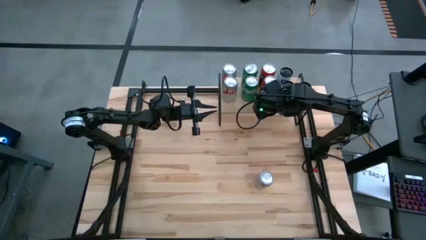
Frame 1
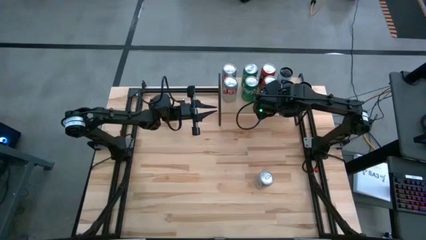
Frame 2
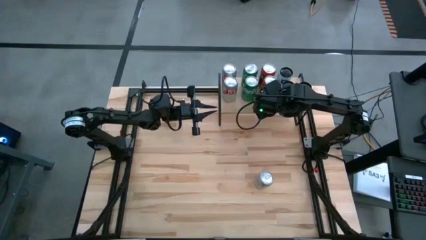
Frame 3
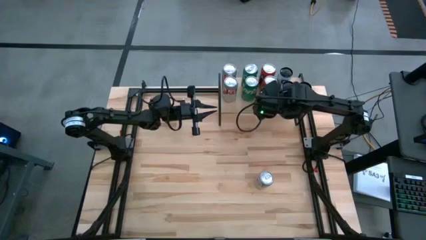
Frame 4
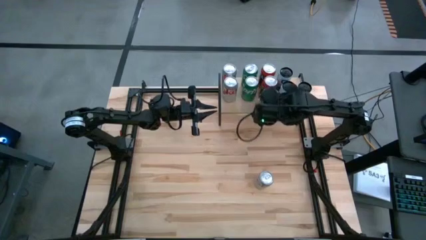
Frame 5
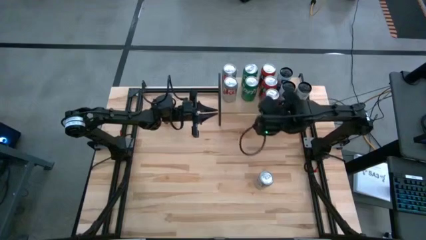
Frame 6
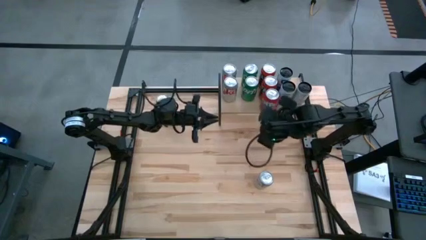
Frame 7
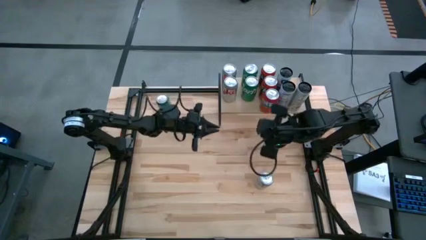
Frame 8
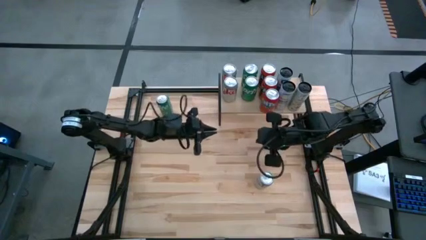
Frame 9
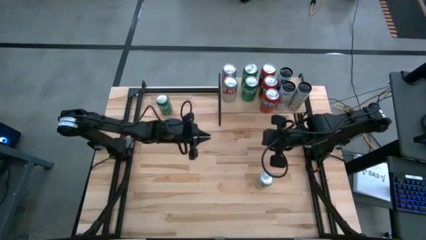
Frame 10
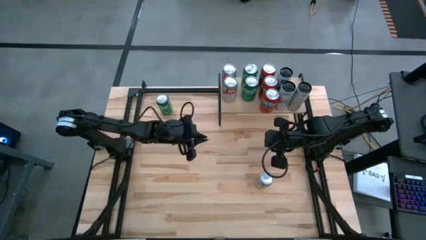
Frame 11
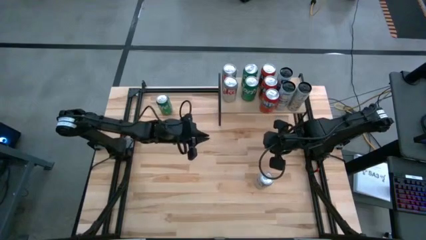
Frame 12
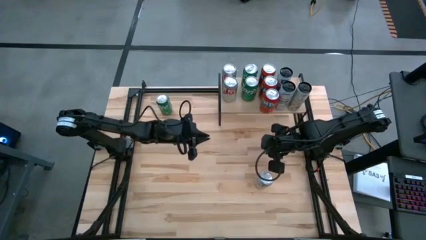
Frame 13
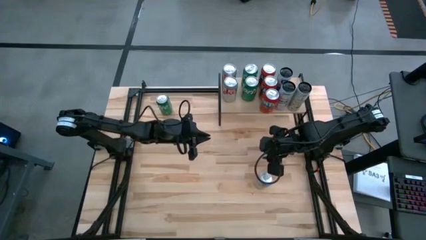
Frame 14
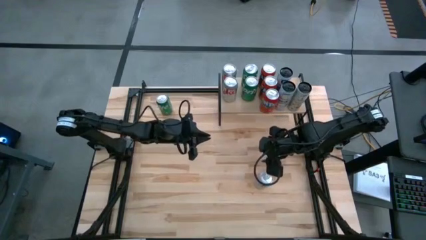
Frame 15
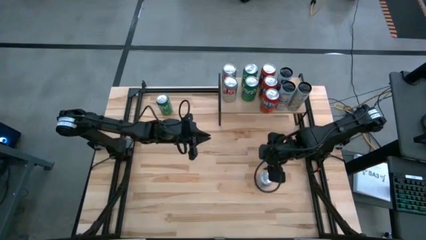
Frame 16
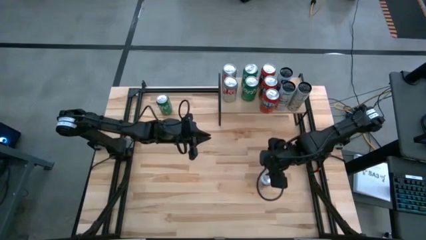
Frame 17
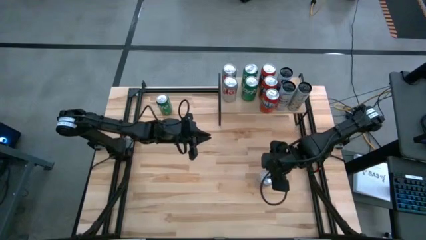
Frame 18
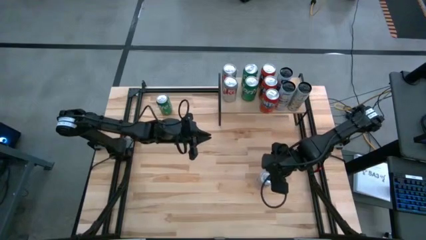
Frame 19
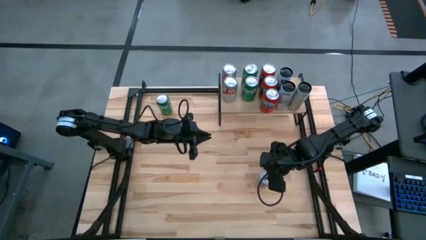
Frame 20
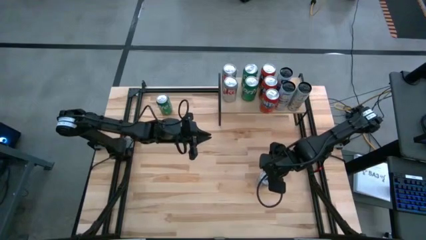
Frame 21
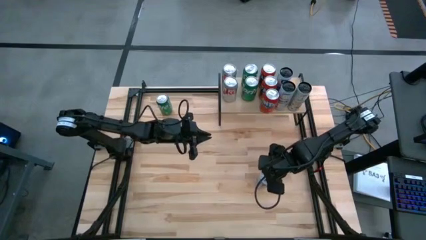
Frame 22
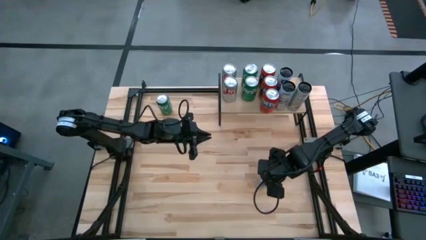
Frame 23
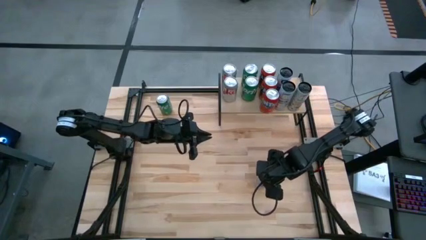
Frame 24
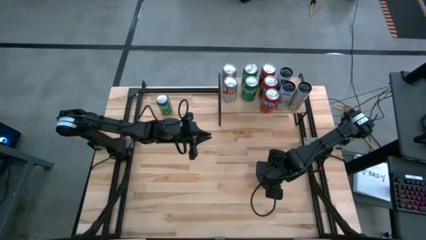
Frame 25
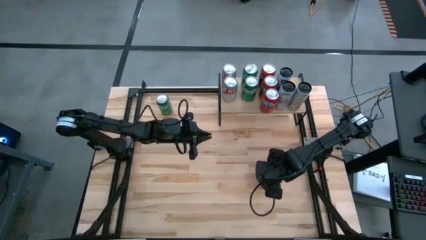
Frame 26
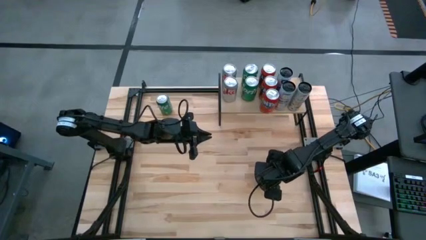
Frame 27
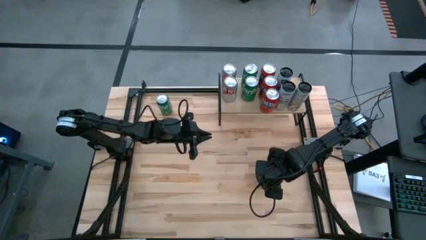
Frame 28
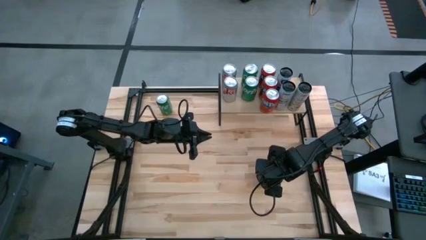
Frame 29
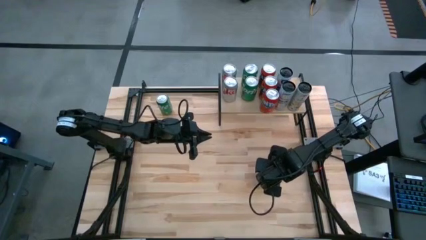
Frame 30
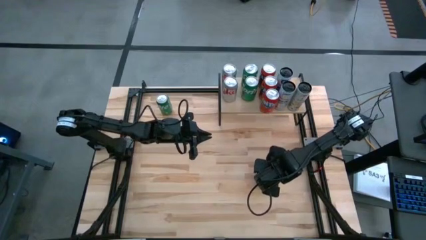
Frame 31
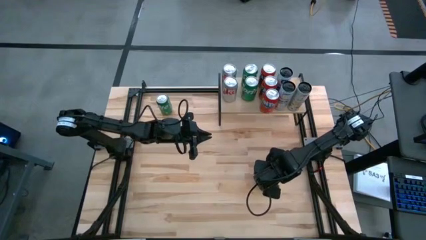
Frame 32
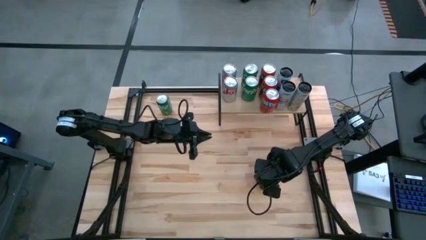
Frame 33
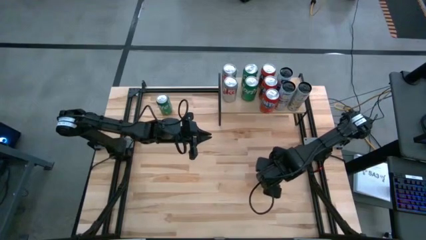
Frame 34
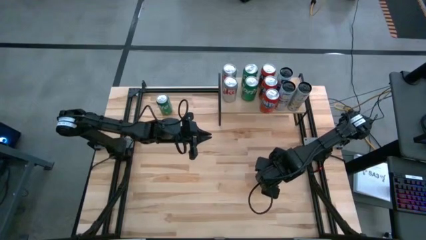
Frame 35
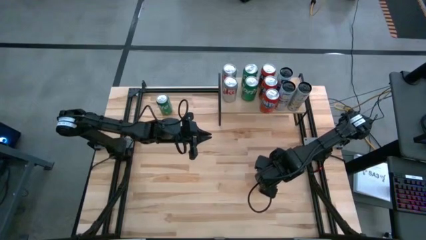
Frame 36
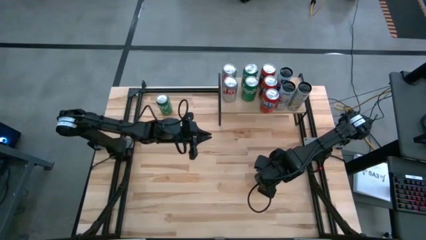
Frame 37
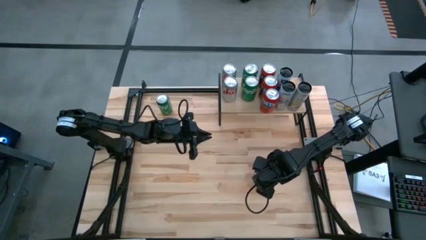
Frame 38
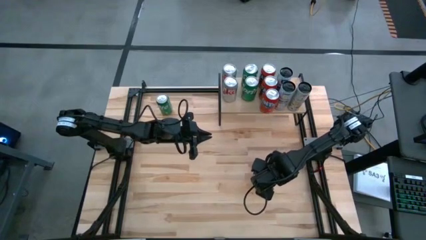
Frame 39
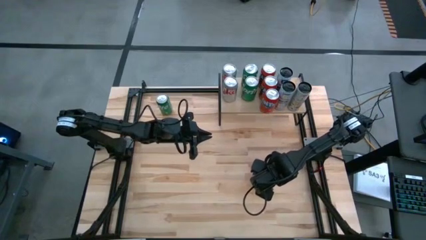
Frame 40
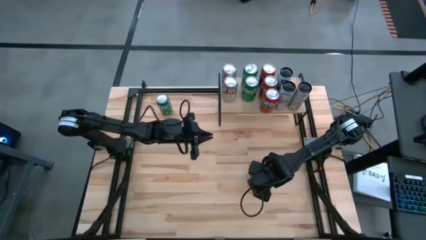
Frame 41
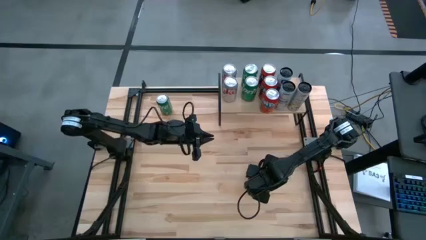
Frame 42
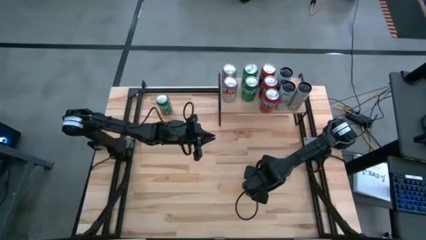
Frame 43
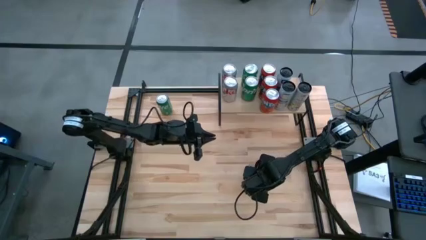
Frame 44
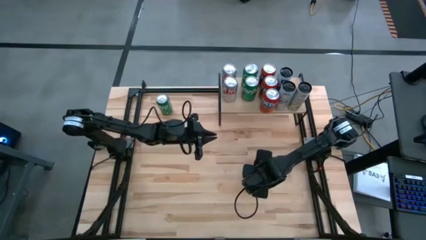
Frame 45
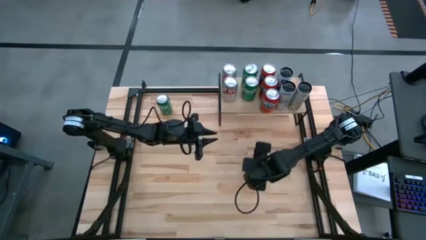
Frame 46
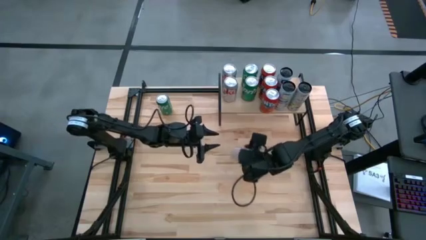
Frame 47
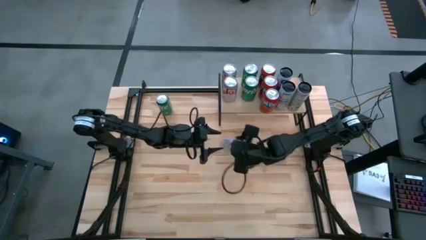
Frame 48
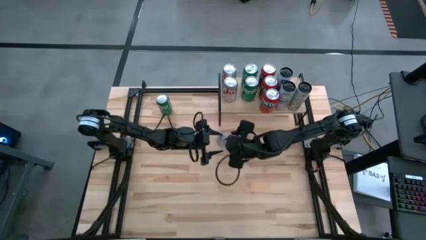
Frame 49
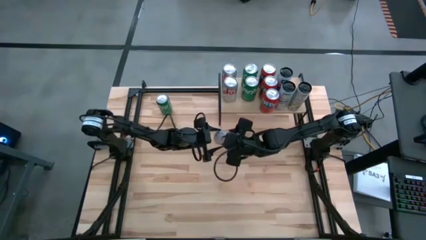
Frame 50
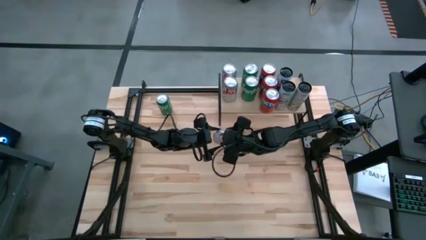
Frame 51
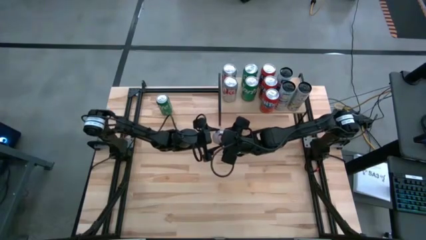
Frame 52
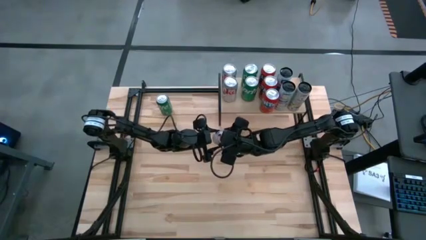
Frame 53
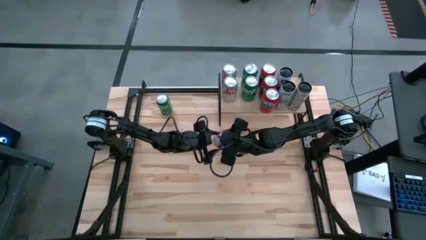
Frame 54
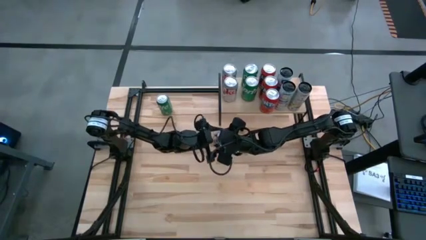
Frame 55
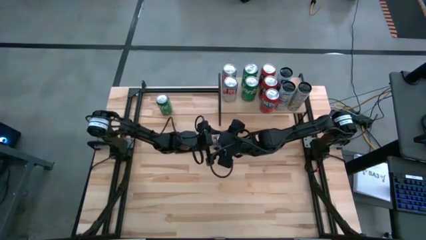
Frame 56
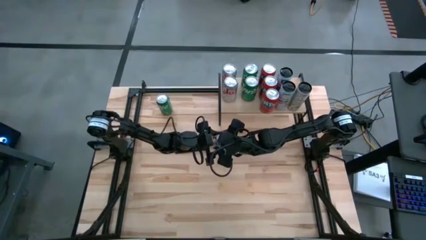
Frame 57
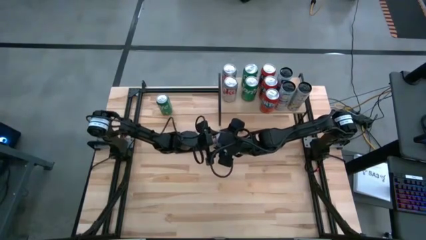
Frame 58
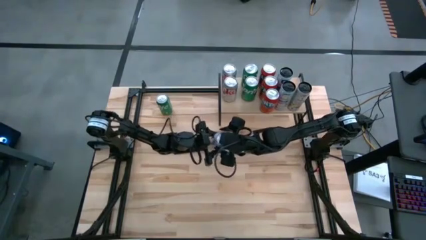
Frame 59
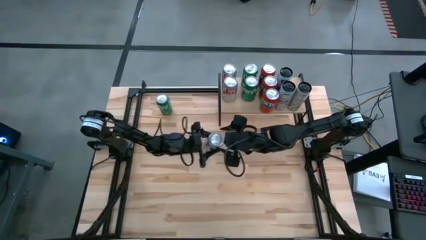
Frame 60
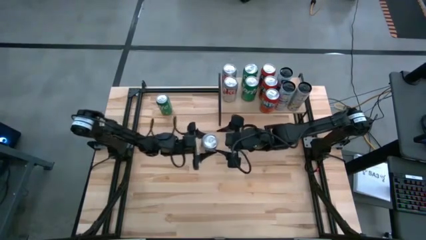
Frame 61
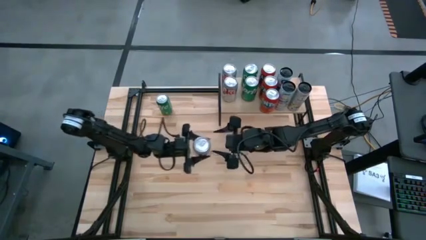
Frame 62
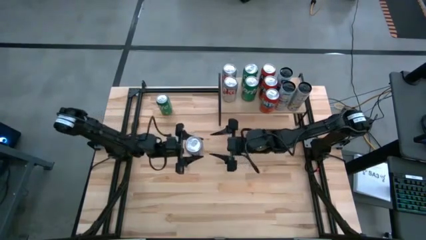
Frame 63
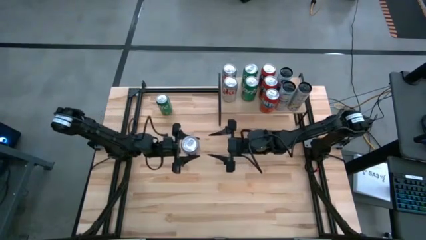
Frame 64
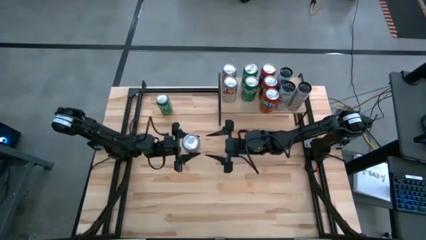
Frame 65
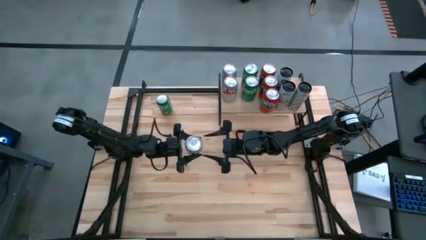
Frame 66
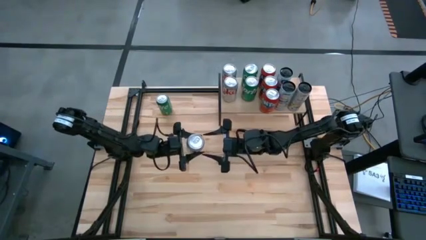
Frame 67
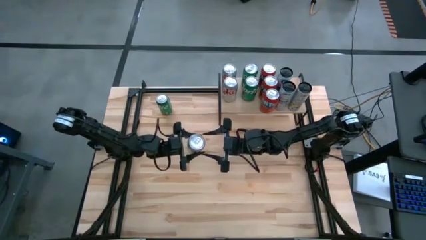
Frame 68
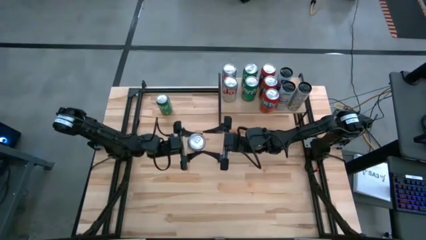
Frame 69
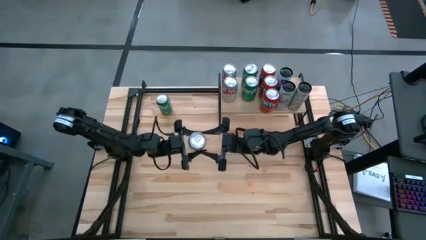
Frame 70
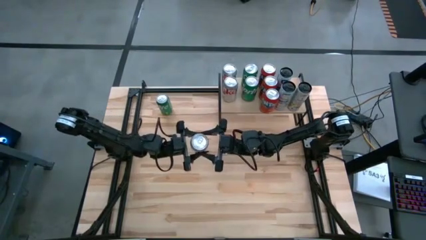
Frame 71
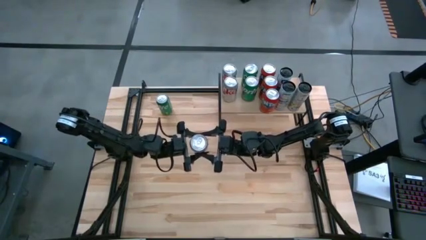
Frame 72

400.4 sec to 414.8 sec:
Task: Place canned beverage on shelf
Put the silver soda can on the shelf aligned in front of the other silver soda can
